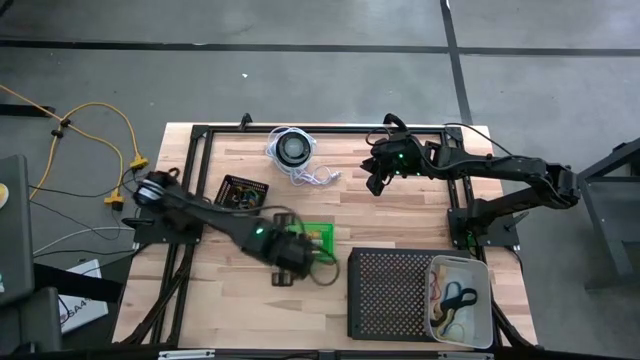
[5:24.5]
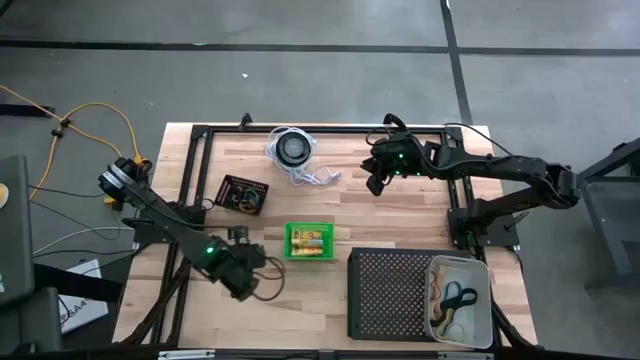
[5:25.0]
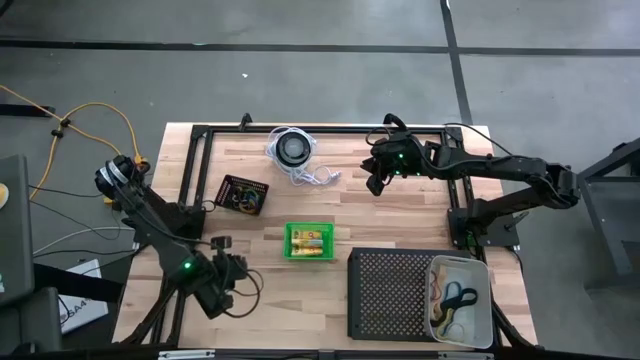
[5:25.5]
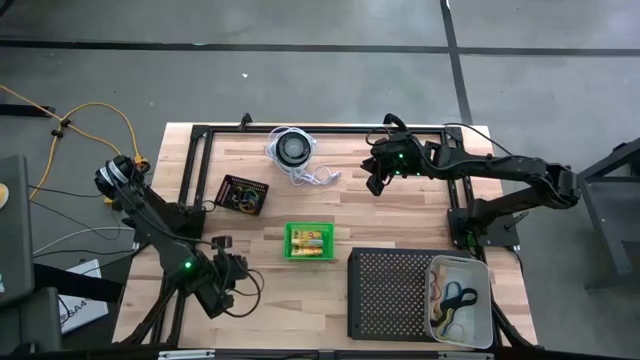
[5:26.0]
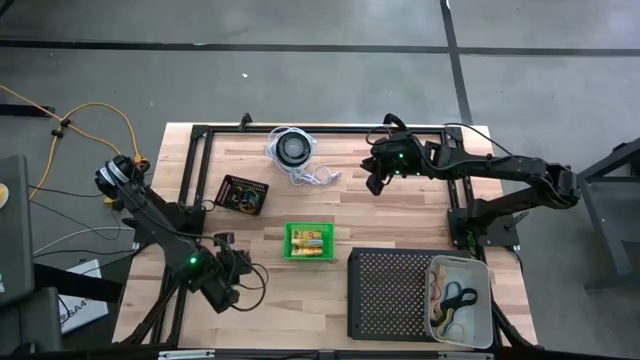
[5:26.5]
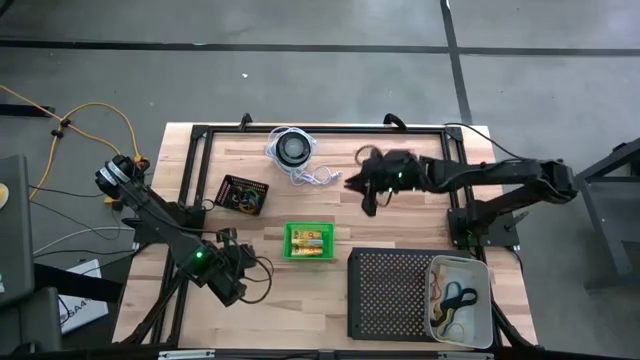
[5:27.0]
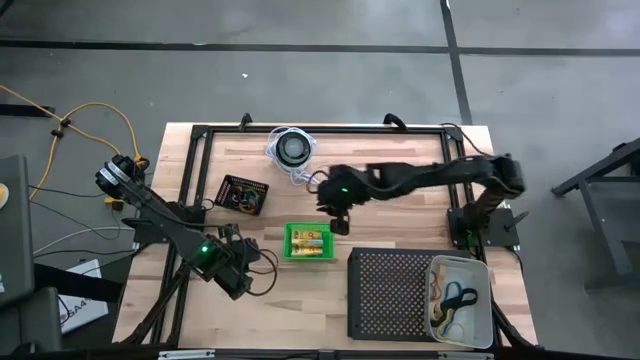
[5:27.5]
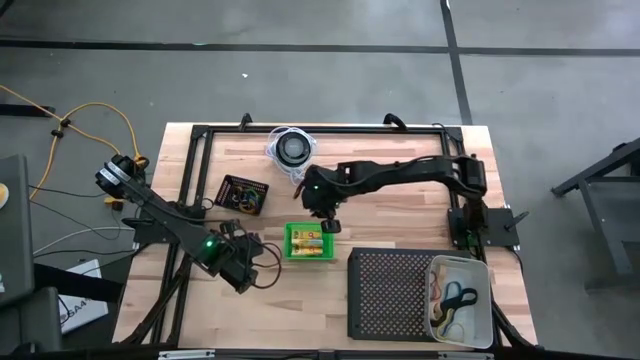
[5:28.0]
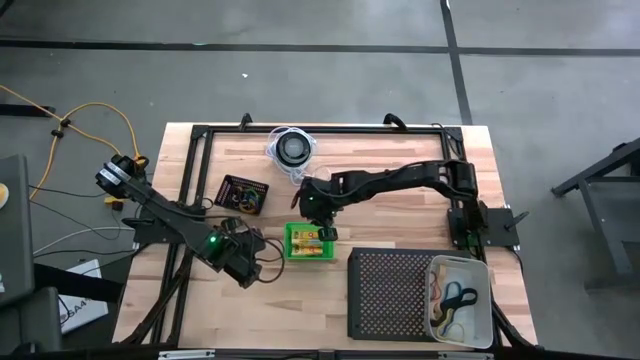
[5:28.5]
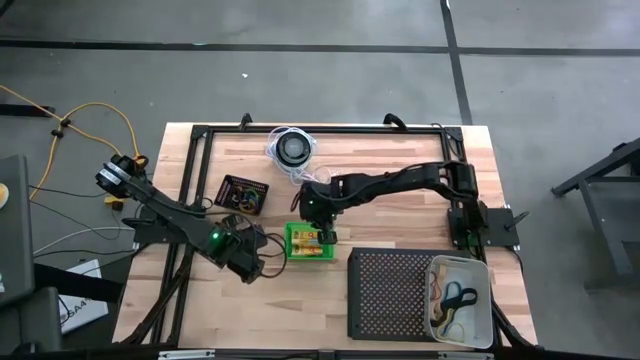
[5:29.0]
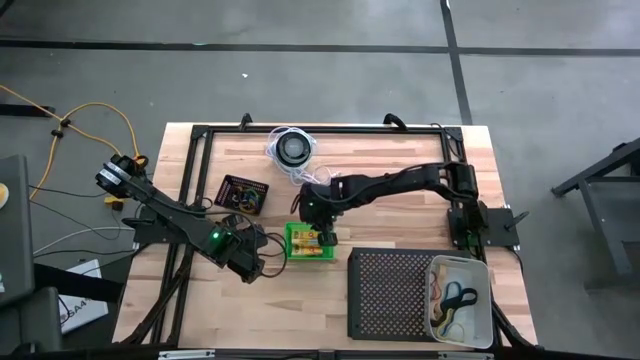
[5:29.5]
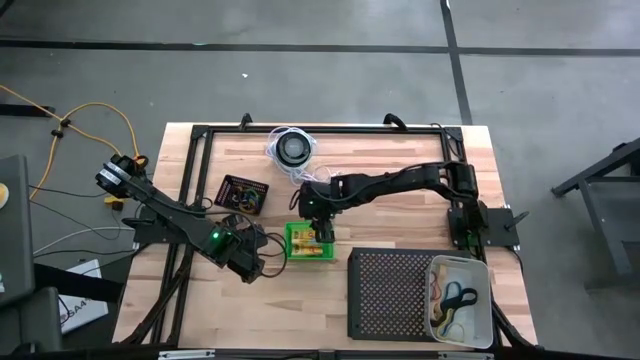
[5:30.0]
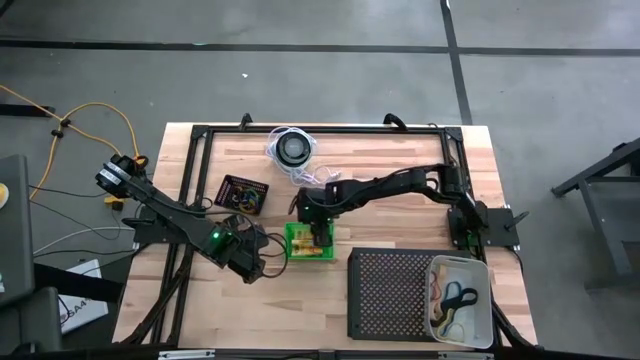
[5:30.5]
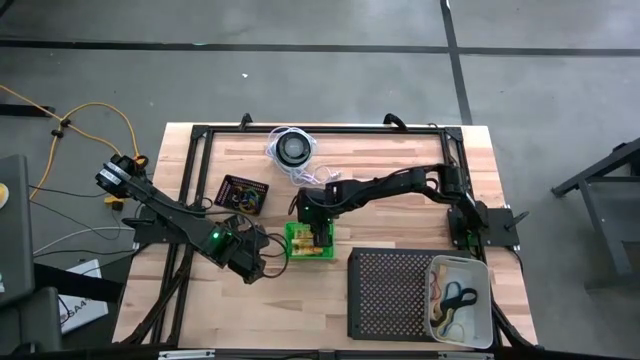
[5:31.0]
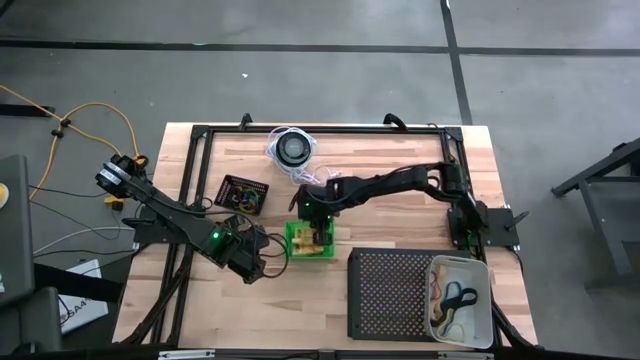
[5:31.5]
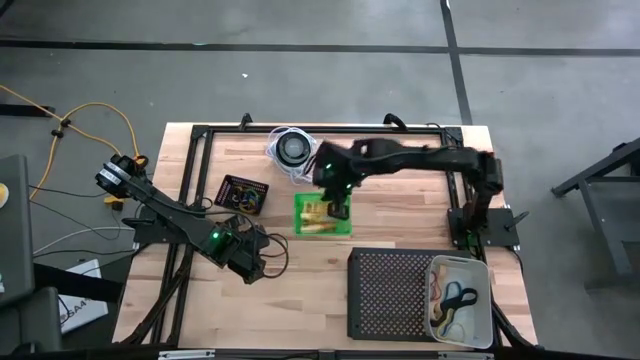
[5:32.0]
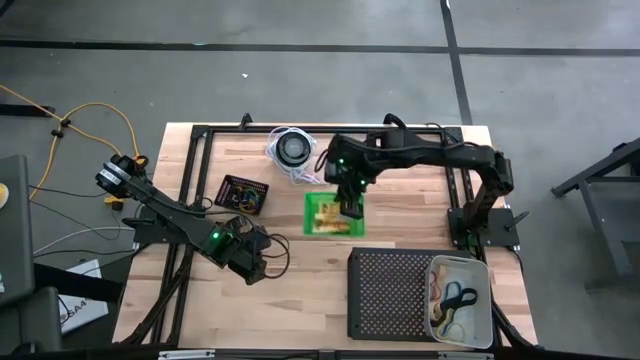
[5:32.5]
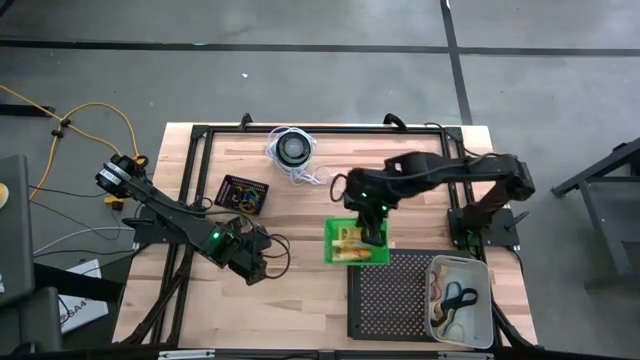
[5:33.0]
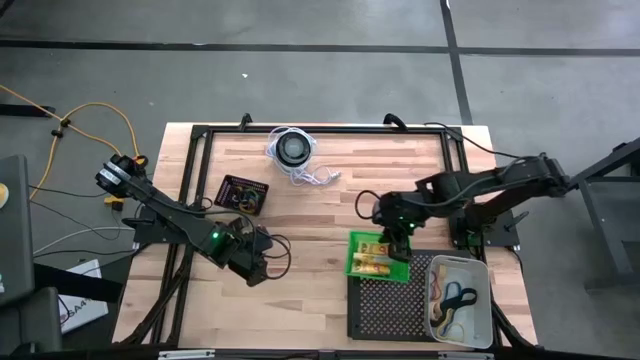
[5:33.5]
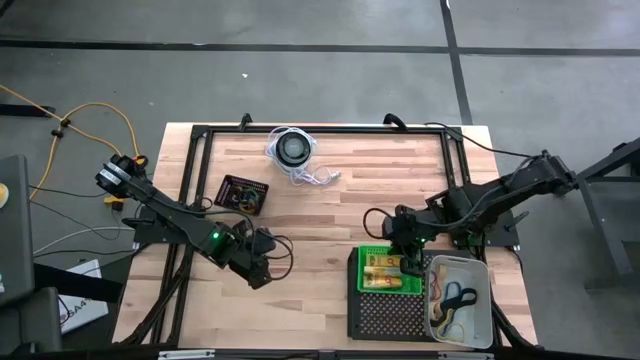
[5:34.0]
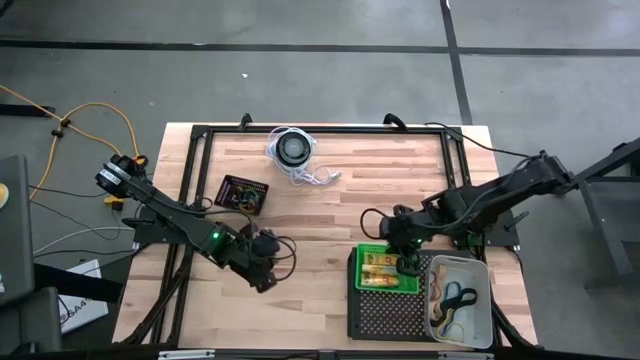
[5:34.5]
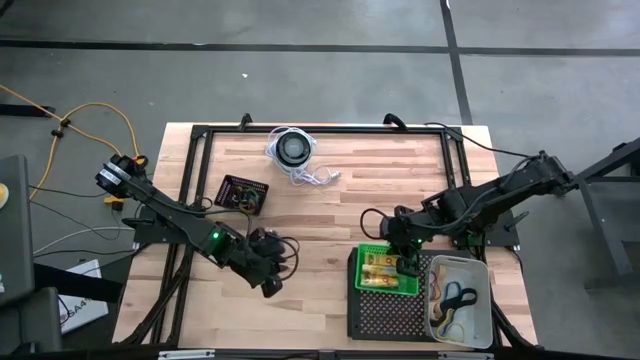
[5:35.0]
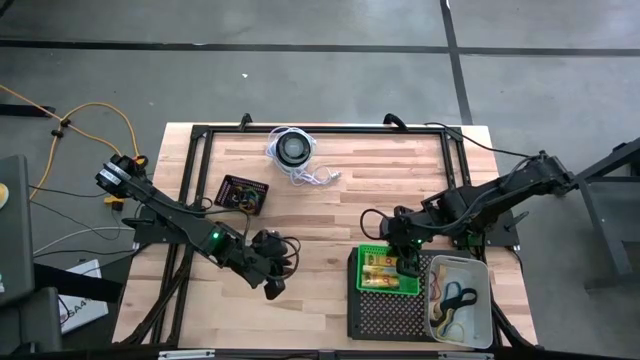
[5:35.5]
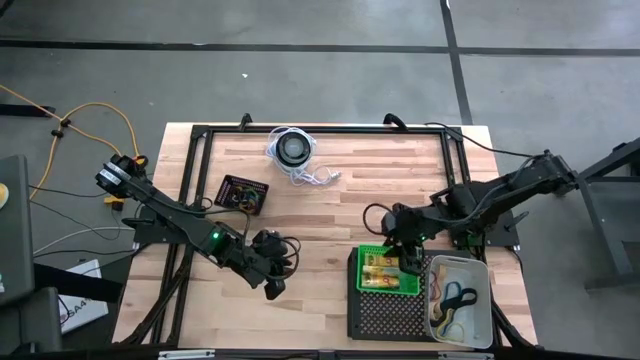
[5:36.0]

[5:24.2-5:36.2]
Task: Pick & Place Office Desk Supplies
Put the green bin on the shelf

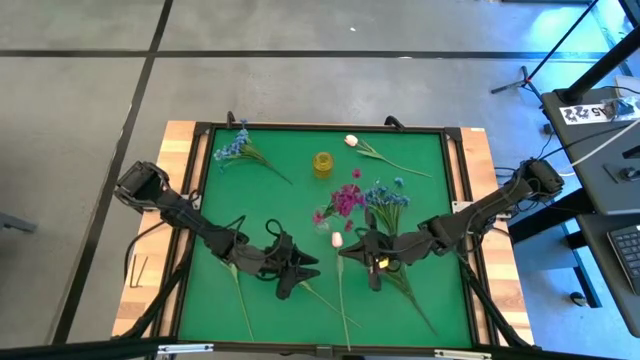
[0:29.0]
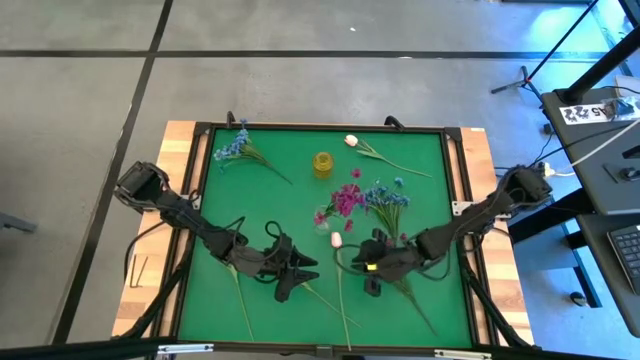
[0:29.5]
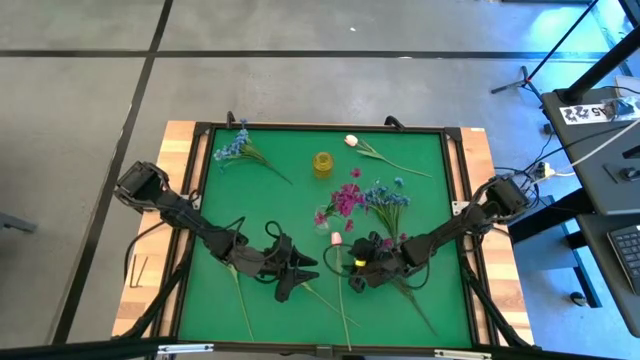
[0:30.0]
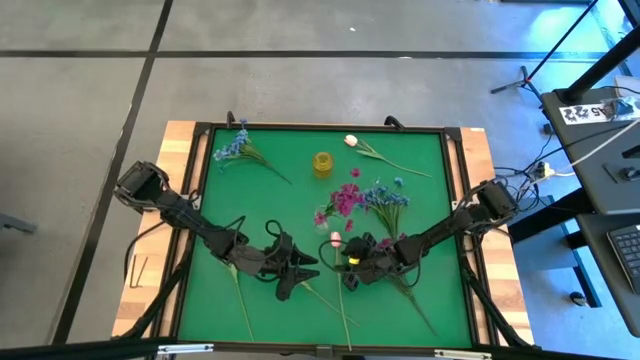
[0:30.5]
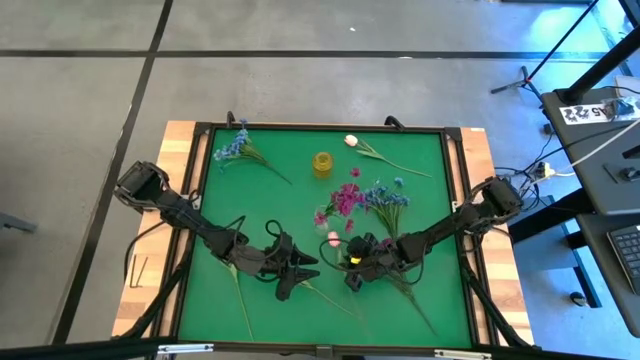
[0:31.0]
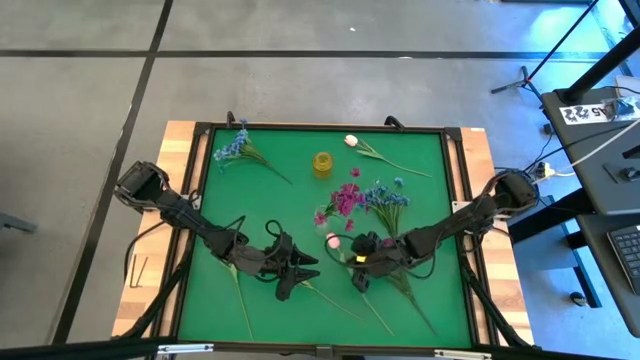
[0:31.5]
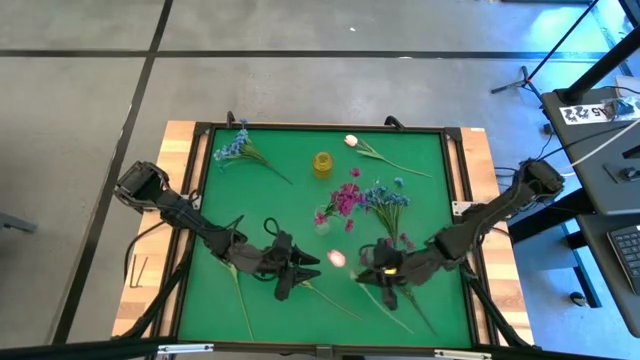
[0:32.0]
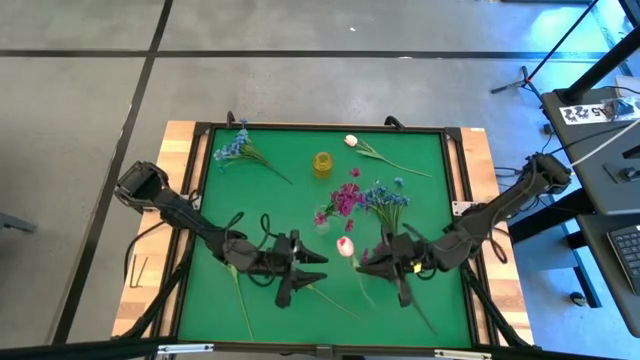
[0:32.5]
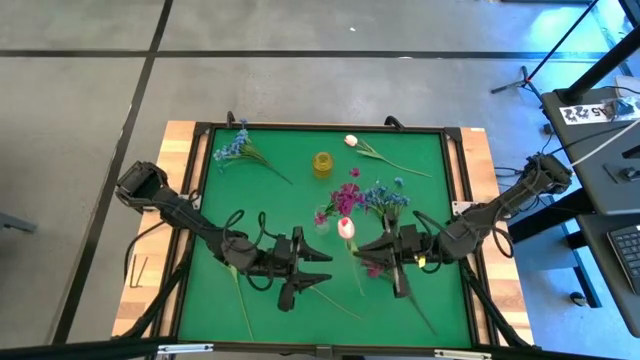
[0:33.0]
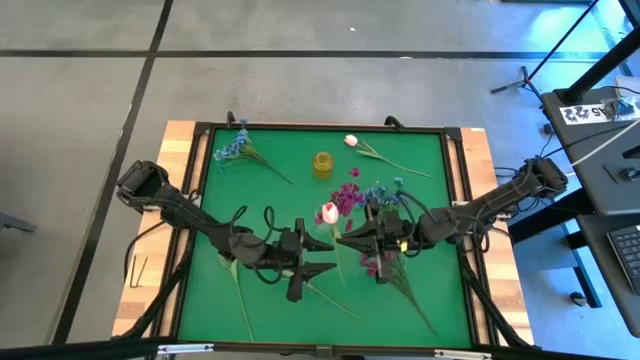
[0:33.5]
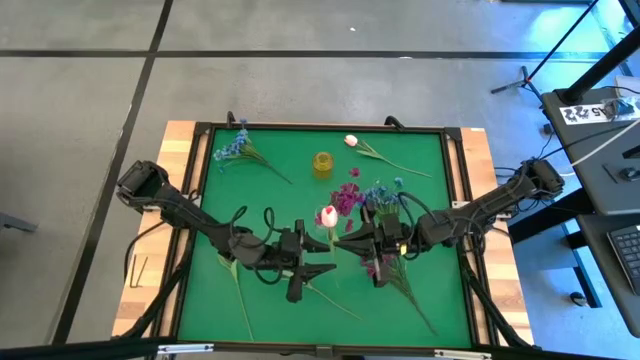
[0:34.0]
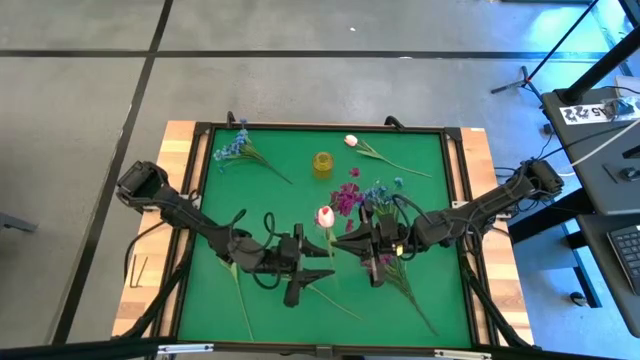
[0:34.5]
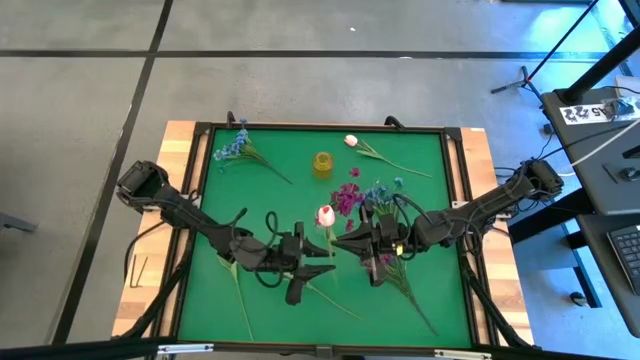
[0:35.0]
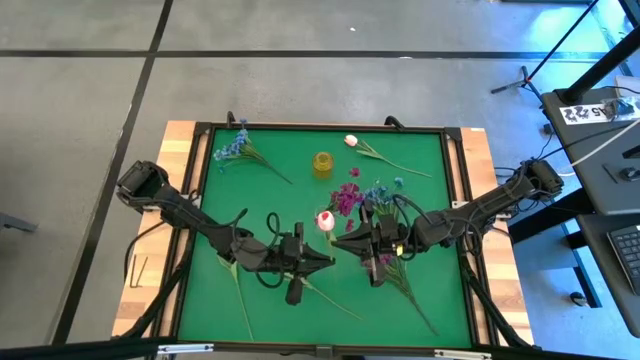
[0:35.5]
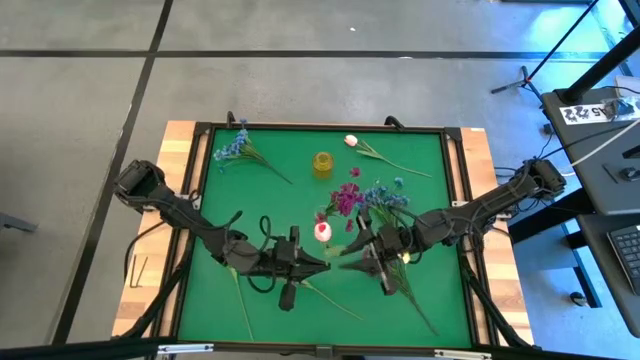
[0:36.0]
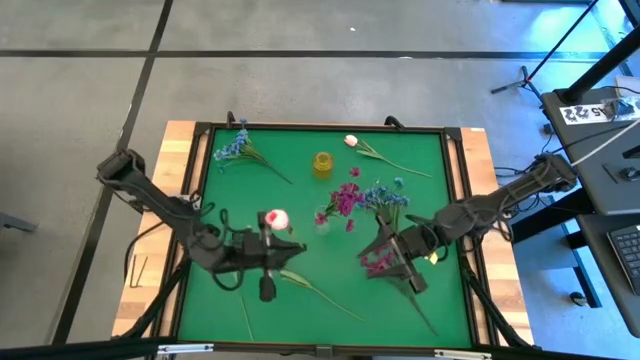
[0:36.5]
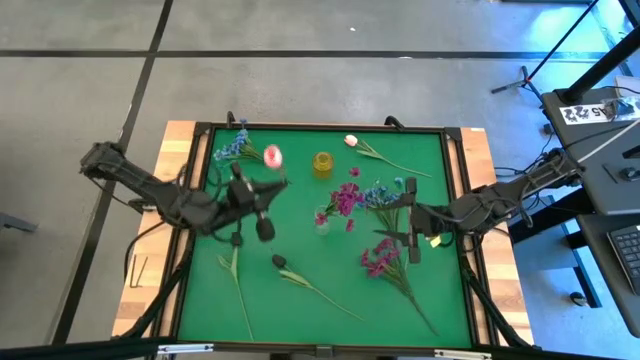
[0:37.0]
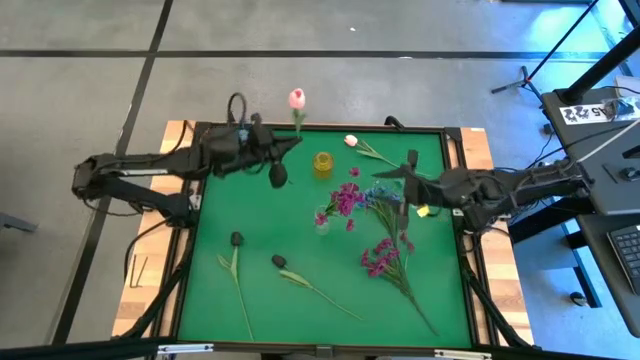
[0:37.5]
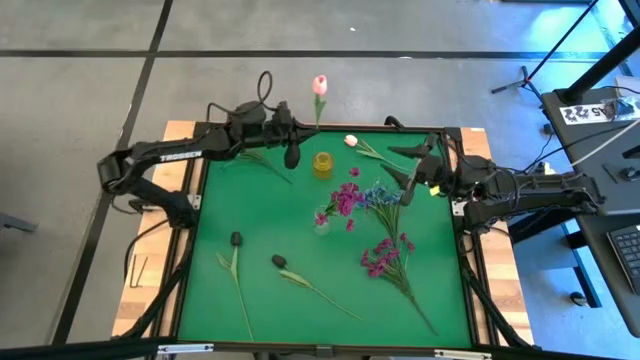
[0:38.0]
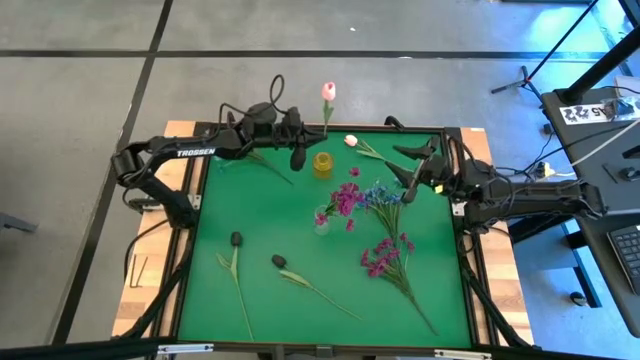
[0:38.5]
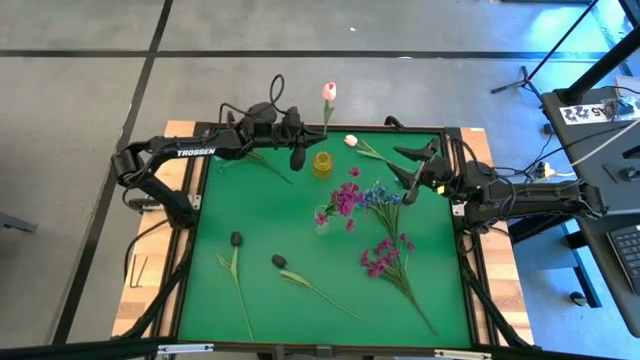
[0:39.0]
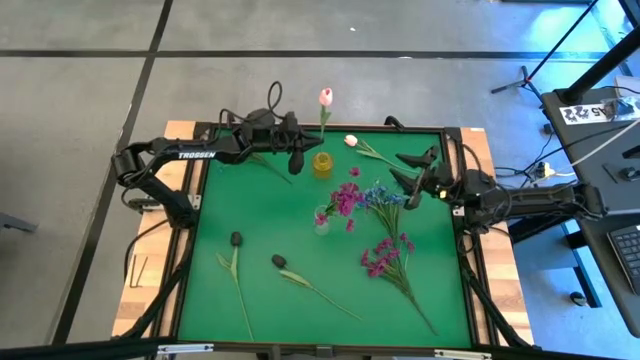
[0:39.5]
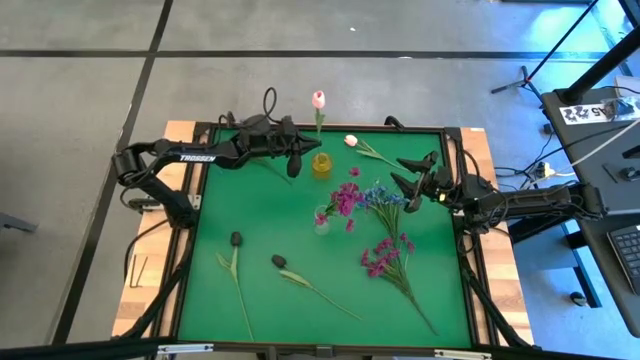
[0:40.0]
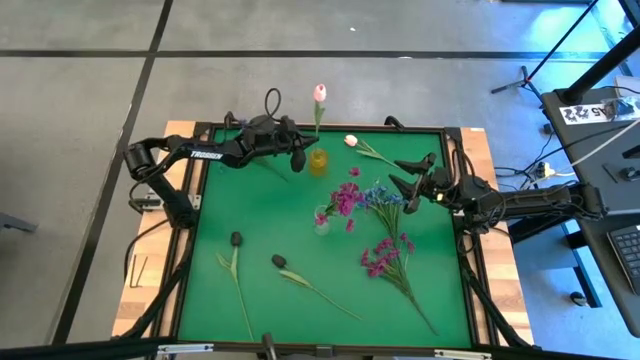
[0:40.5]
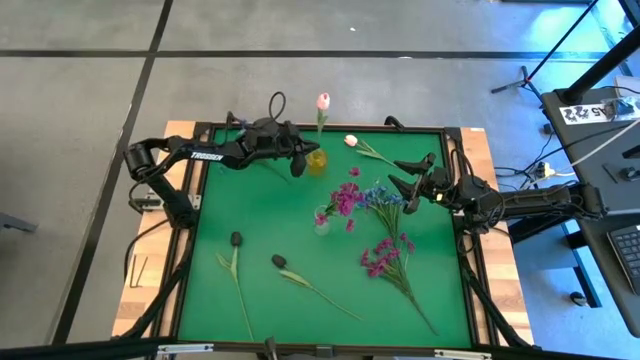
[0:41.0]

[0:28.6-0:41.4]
Task: Sort flowers into vase by color
Put the bottom pink flower into the yellow vase
